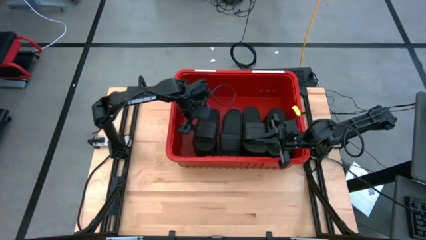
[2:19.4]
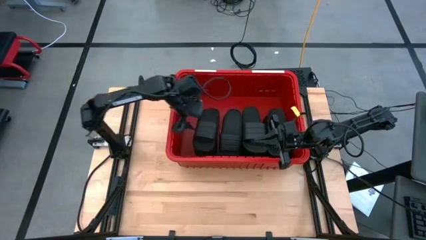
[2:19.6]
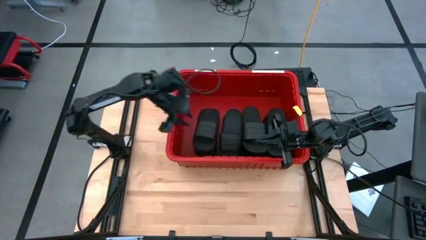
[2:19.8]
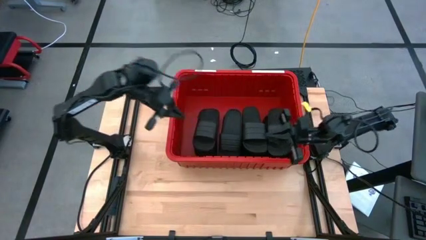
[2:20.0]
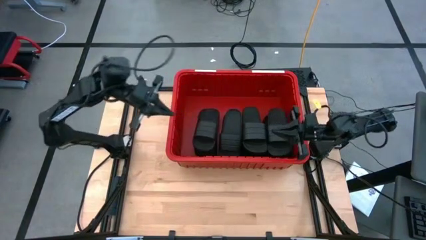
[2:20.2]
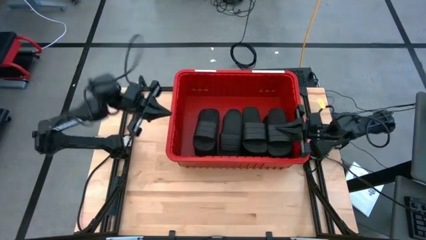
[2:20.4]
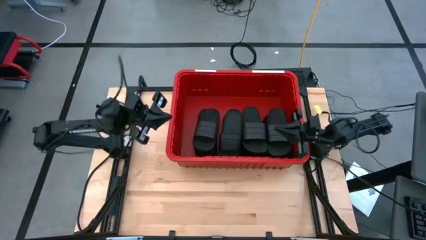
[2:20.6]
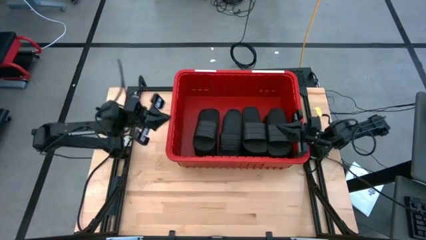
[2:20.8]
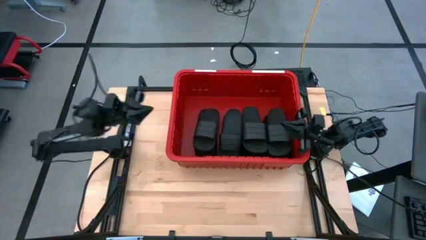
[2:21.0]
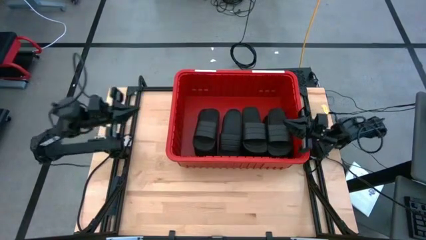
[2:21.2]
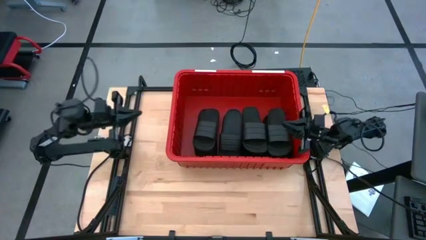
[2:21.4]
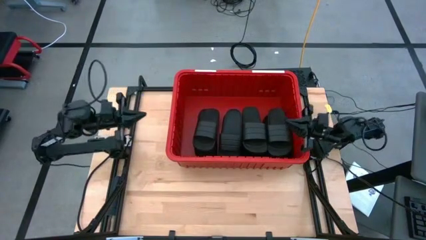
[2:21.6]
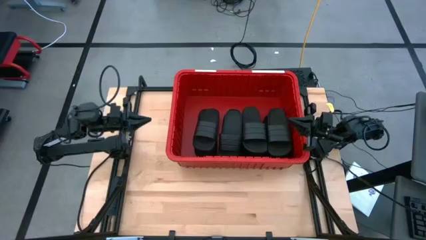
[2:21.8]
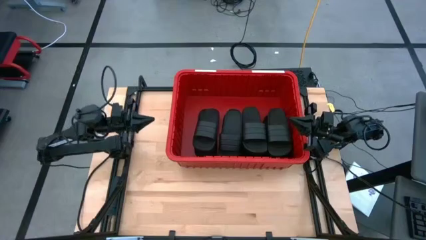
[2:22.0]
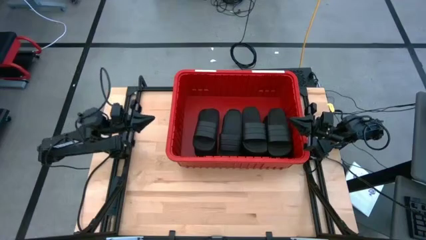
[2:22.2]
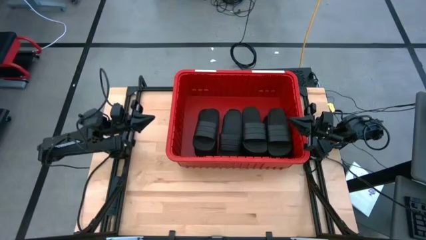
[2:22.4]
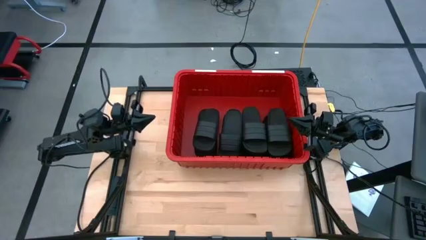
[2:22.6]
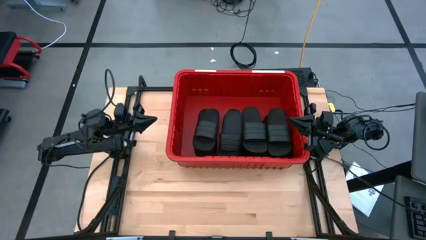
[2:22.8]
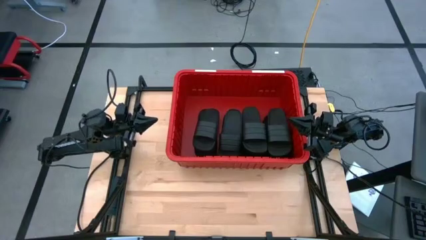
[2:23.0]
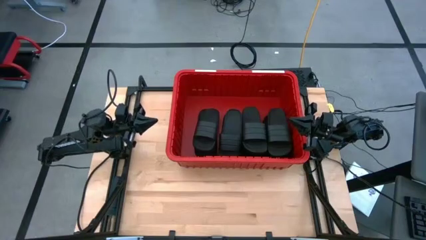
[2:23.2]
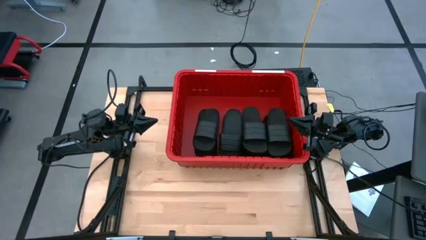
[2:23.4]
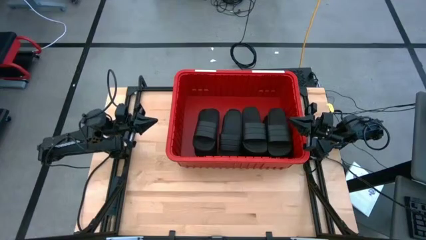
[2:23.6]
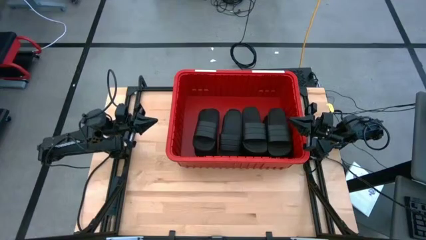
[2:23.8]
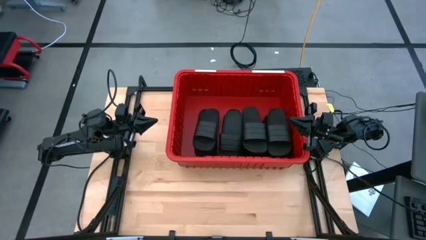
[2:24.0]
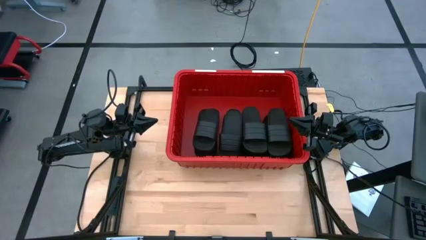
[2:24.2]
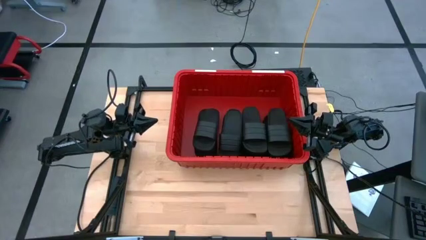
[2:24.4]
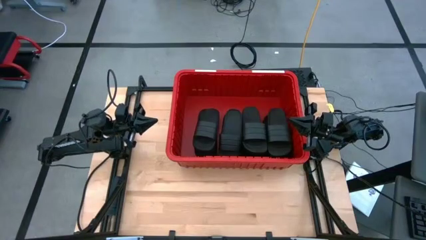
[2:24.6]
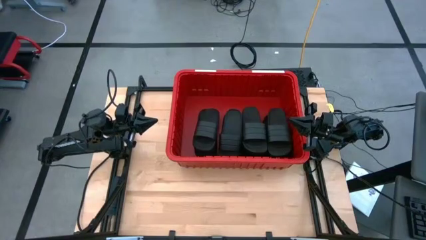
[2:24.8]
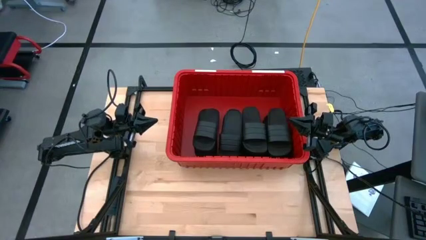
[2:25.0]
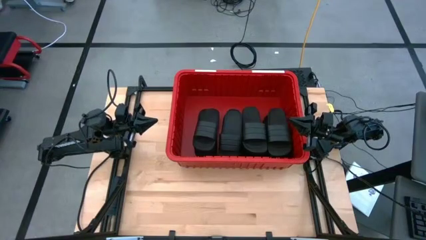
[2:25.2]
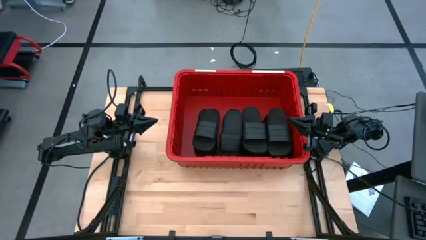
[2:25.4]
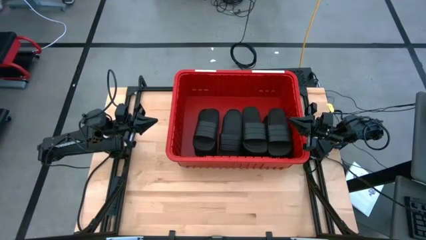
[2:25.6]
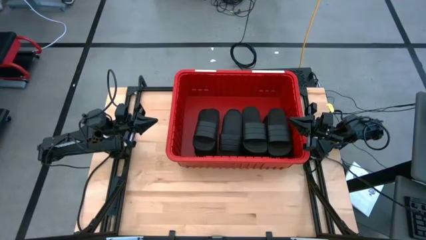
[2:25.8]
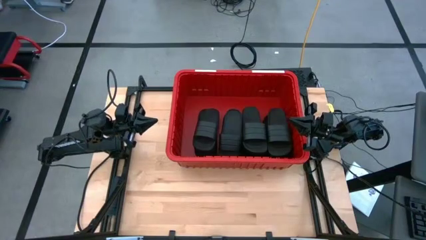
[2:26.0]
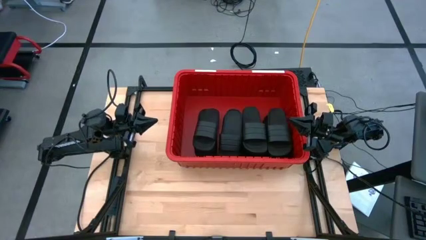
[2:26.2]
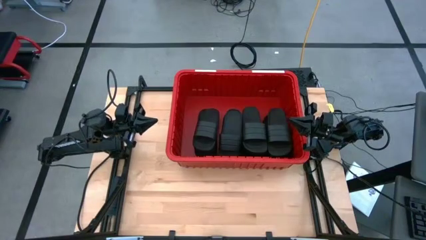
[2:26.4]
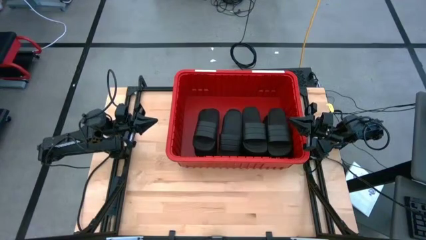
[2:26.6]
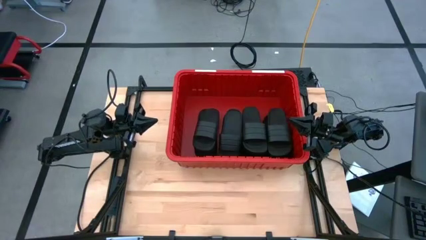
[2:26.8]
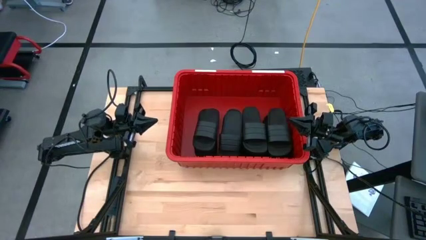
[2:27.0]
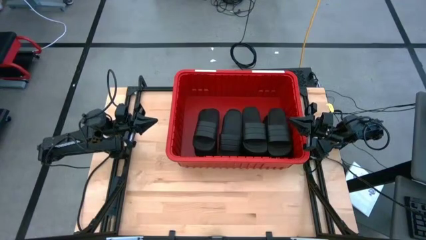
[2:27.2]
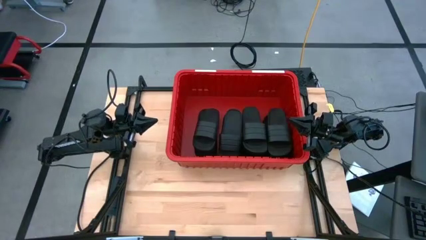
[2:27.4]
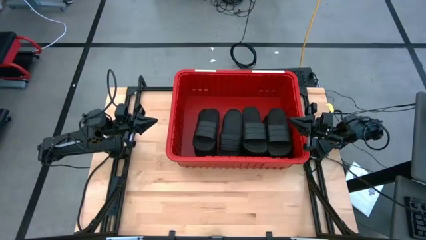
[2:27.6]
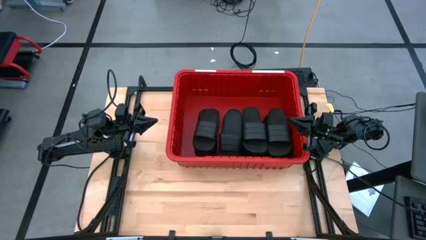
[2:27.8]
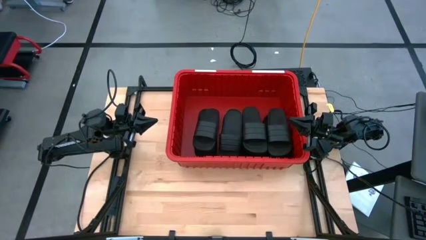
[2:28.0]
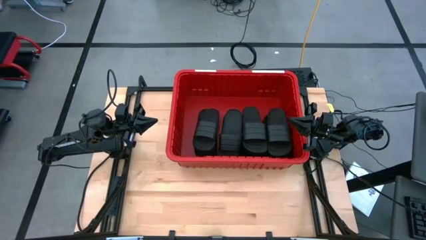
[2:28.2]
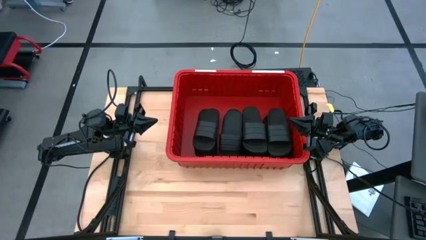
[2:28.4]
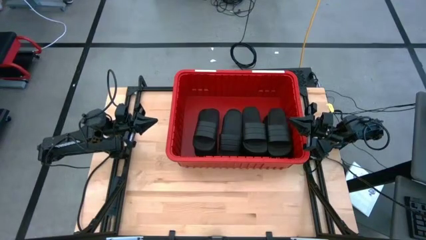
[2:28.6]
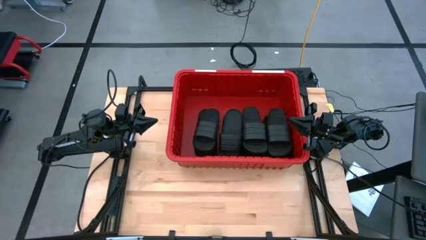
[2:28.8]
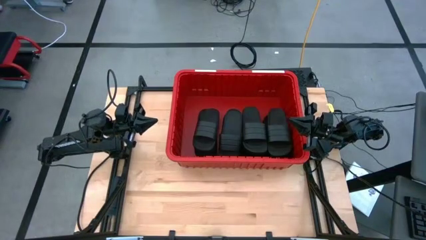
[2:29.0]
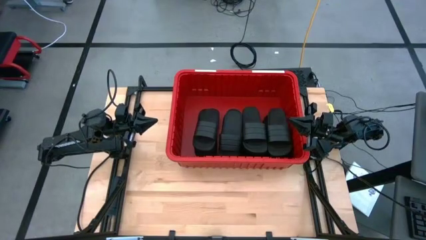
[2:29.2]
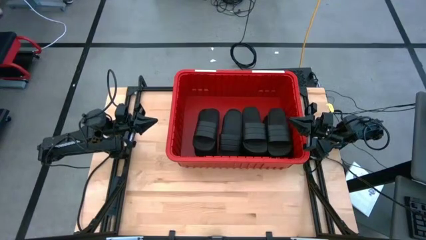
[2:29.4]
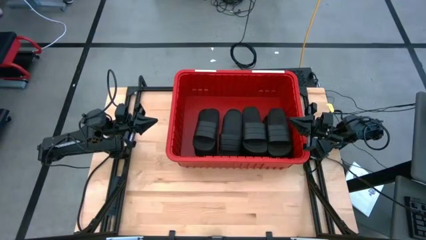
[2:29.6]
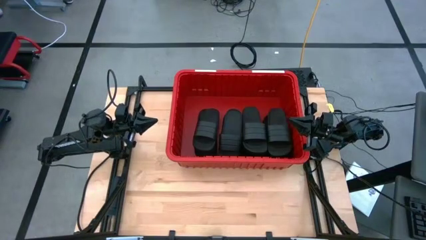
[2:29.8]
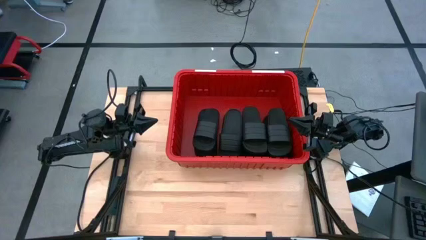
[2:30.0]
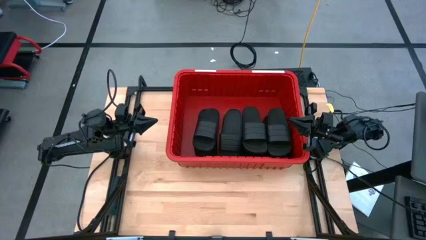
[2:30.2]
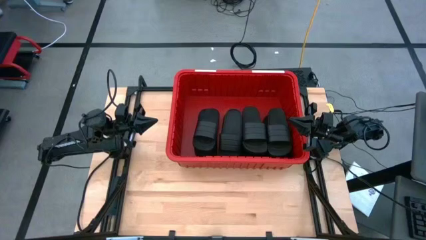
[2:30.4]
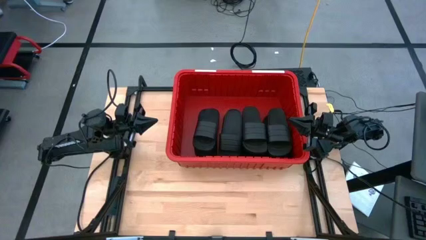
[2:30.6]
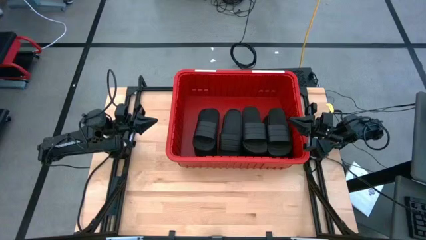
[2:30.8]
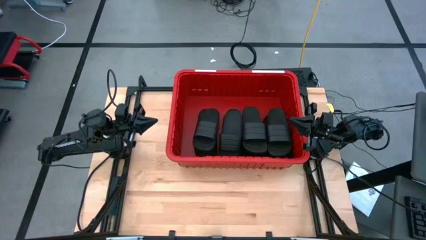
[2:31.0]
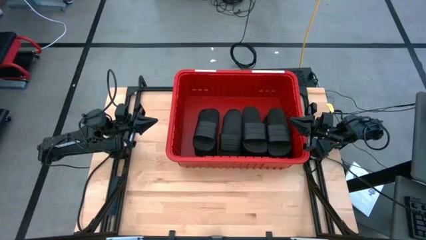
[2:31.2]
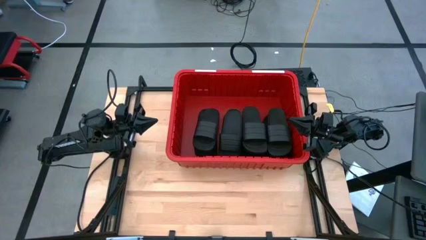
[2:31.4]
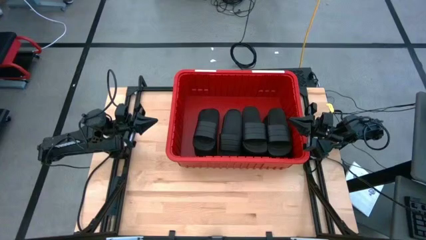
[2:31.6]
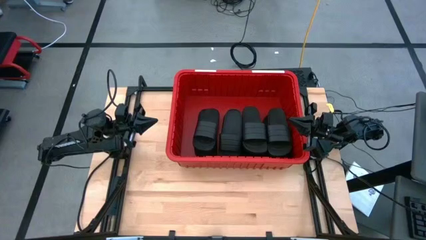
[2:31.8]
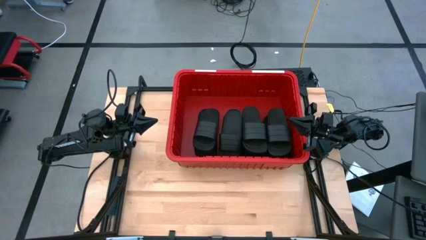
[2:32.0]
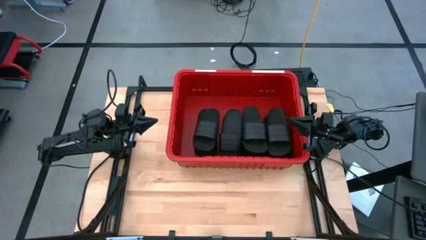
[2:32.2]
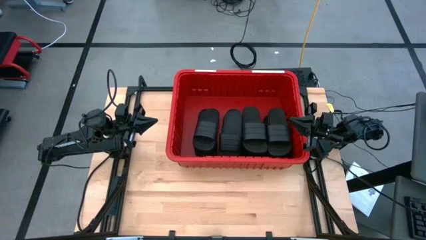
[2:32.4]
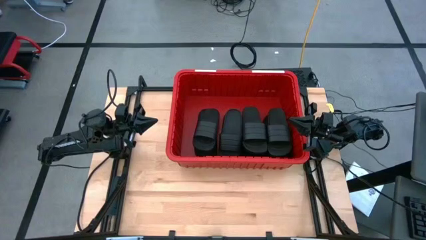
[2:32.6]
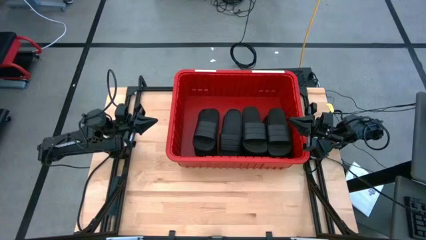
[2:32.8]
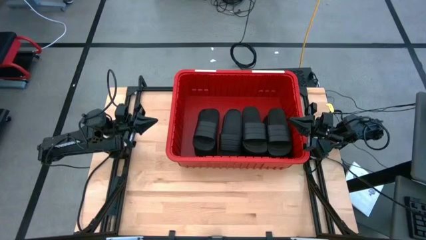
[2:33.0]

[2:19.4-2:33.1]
Task: Pick and place slides into bin
Return to Home Position
